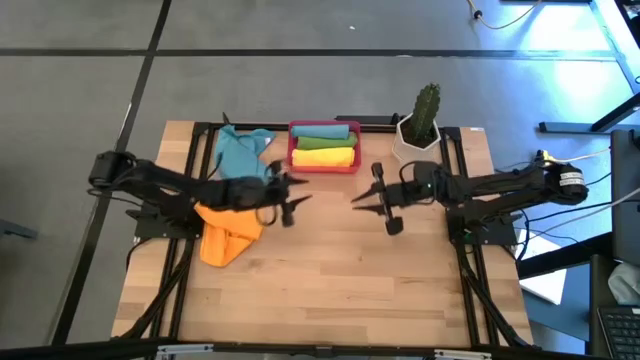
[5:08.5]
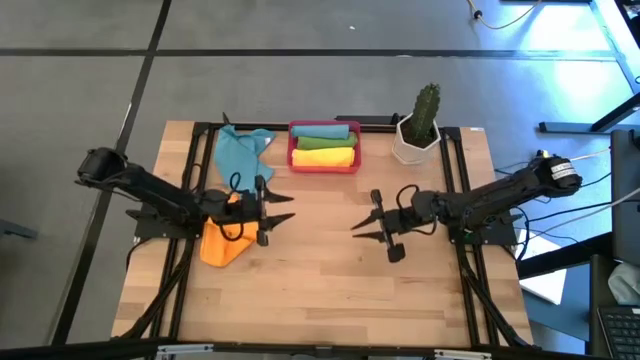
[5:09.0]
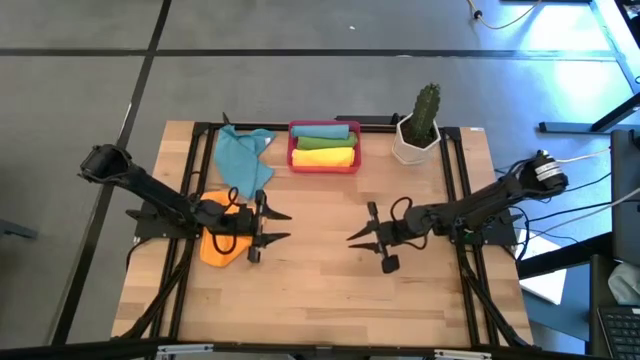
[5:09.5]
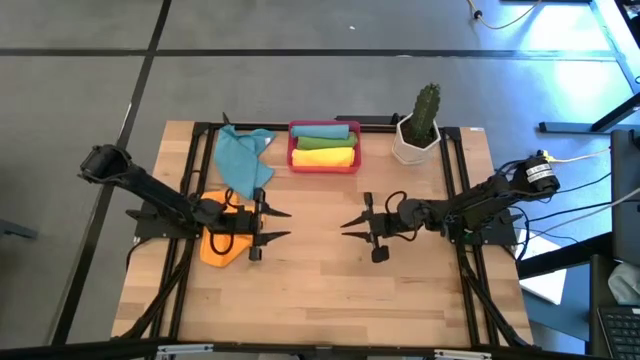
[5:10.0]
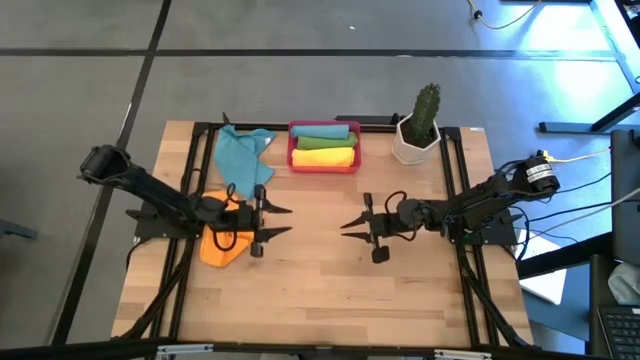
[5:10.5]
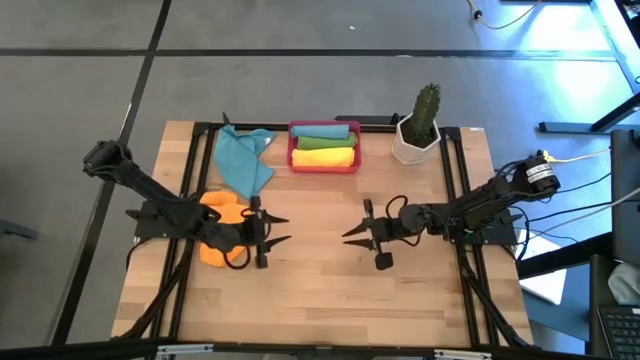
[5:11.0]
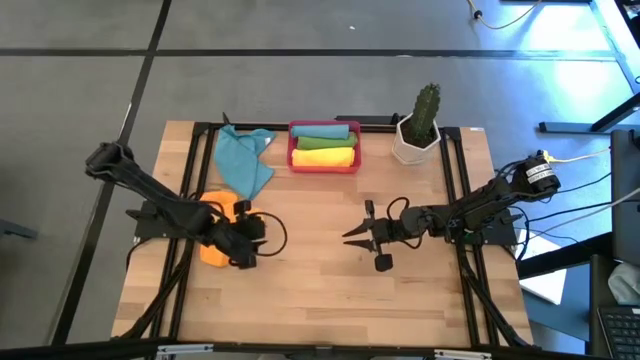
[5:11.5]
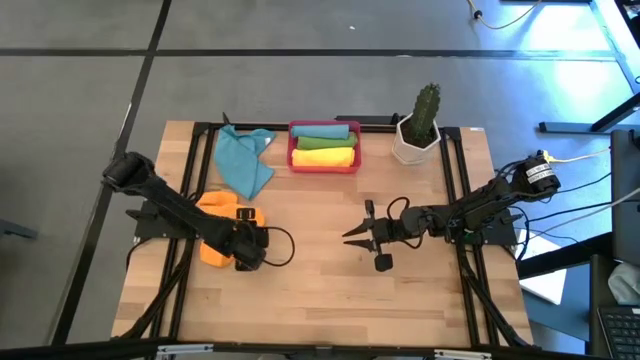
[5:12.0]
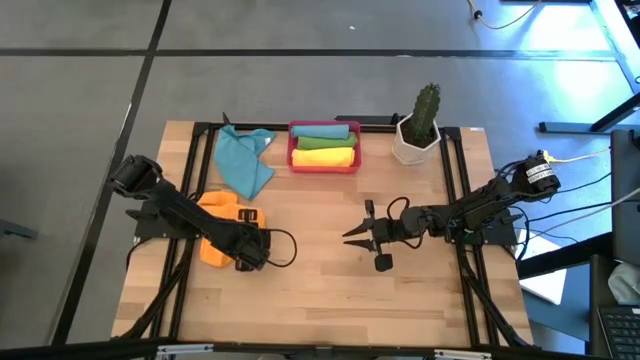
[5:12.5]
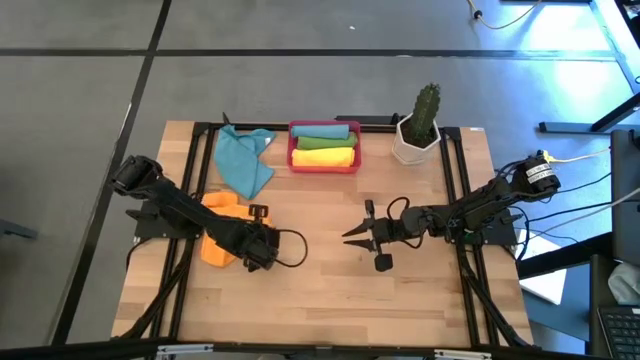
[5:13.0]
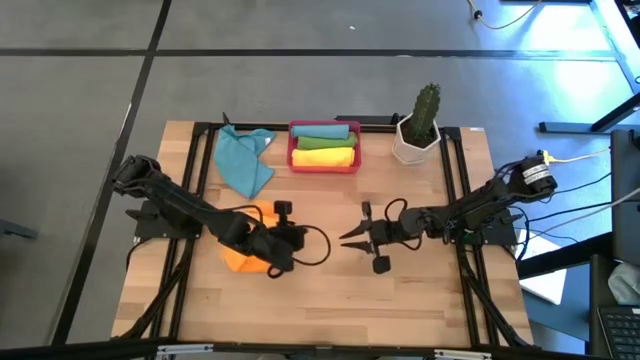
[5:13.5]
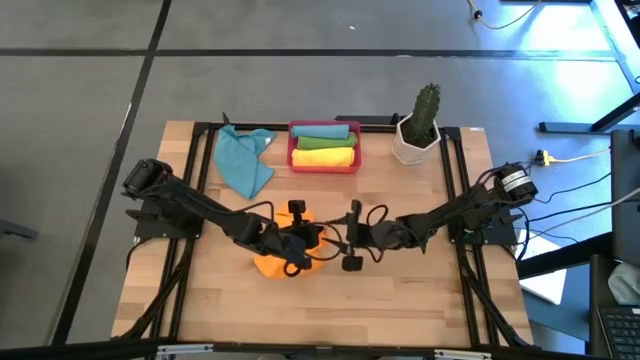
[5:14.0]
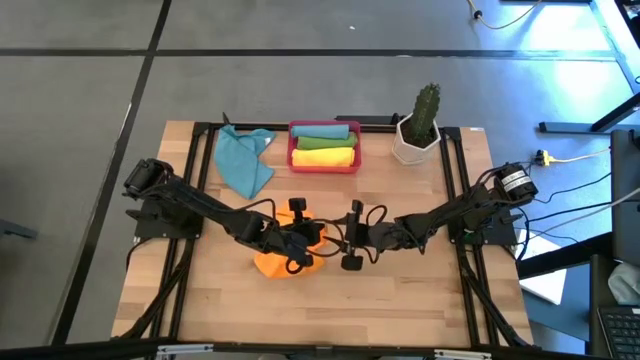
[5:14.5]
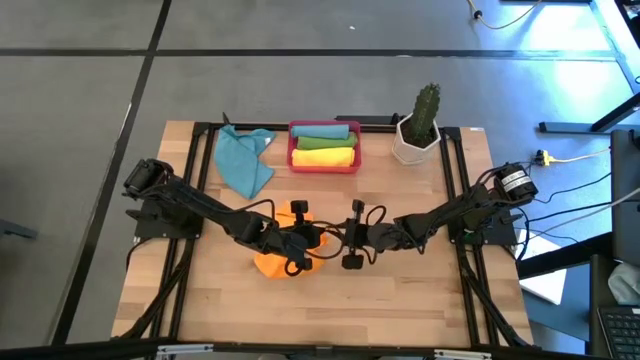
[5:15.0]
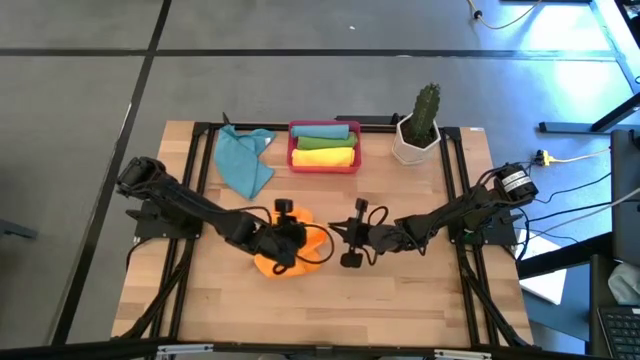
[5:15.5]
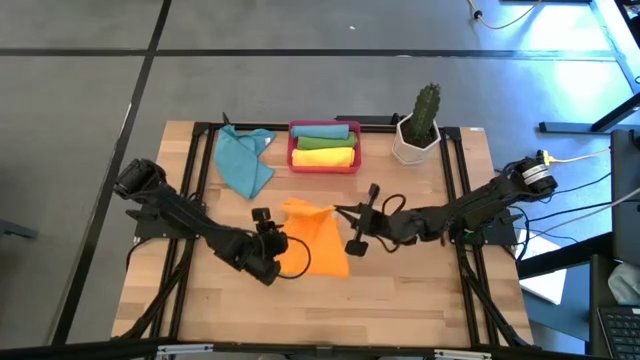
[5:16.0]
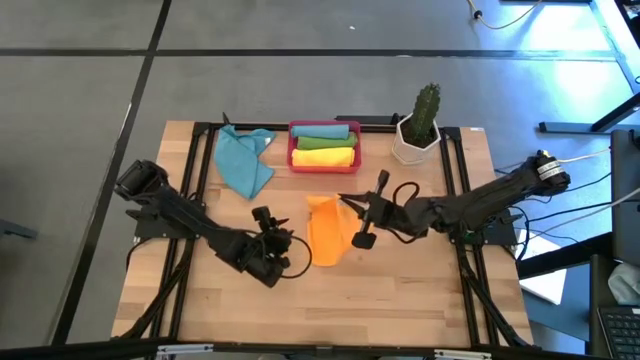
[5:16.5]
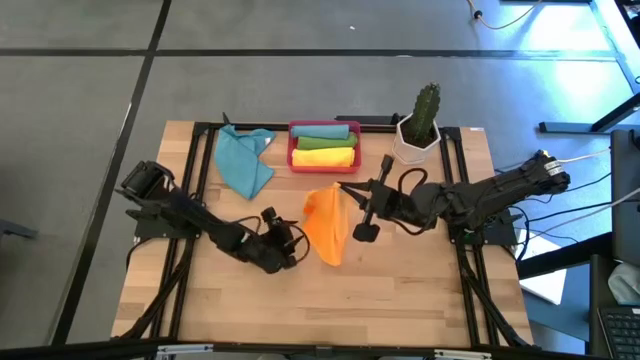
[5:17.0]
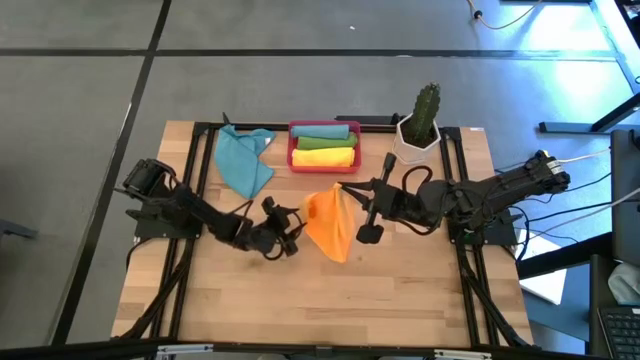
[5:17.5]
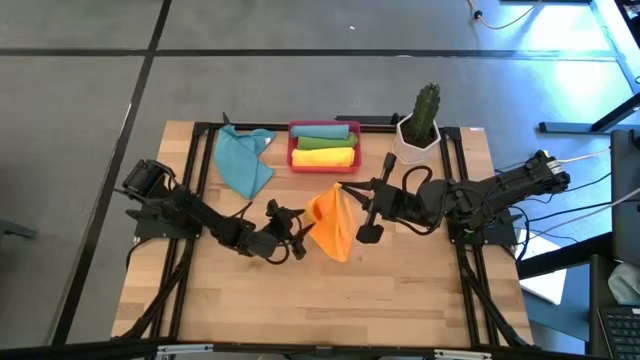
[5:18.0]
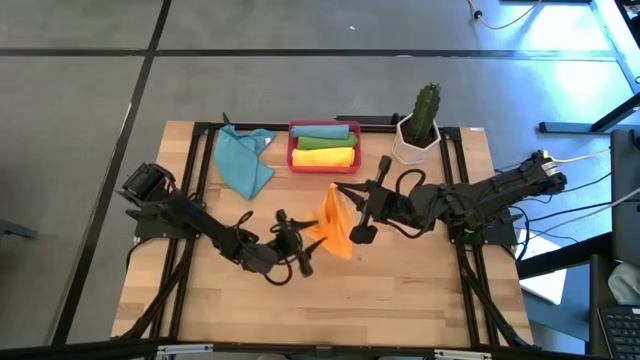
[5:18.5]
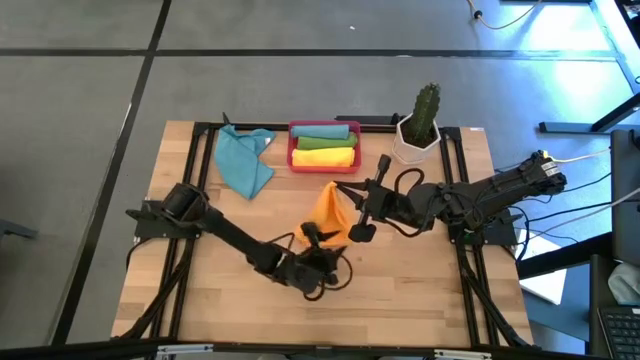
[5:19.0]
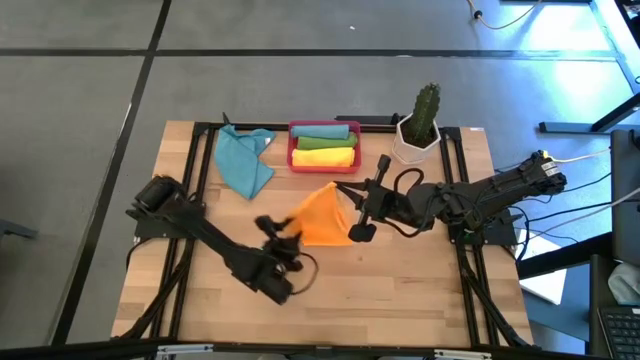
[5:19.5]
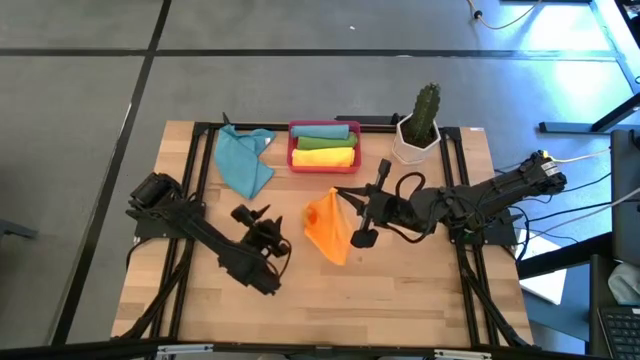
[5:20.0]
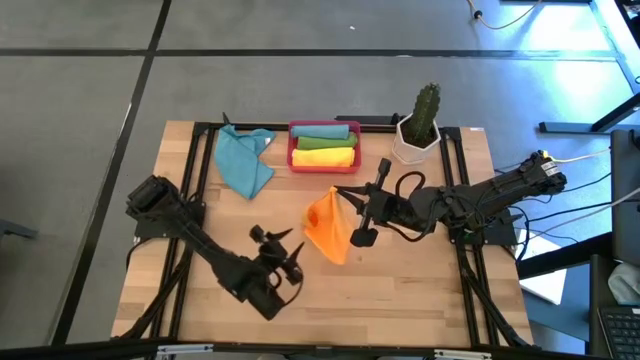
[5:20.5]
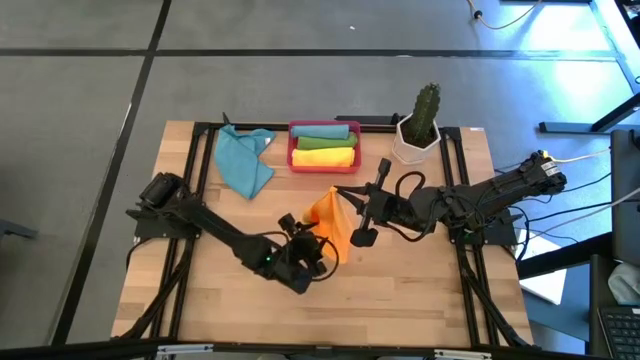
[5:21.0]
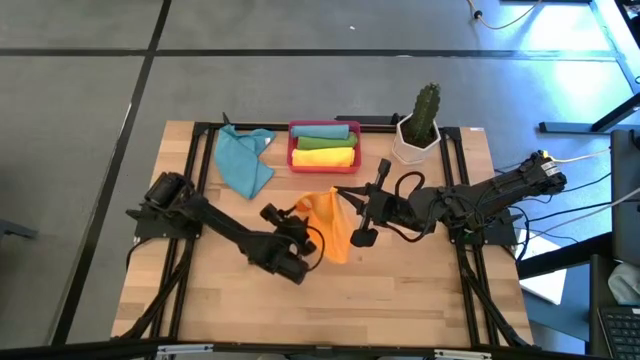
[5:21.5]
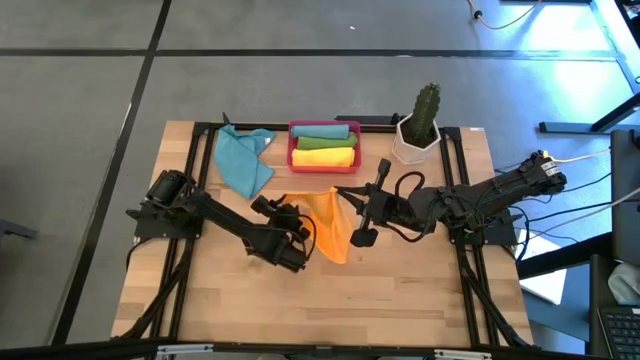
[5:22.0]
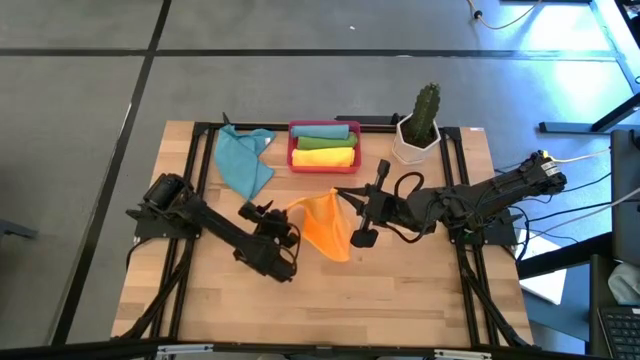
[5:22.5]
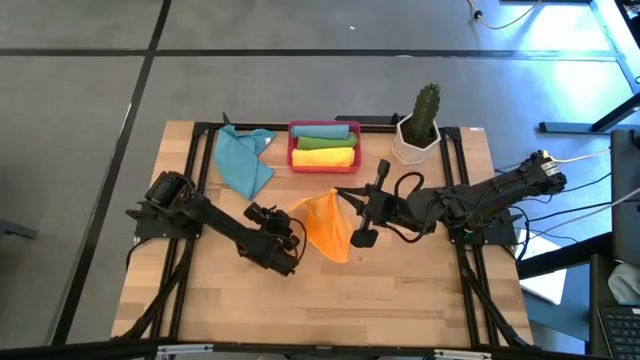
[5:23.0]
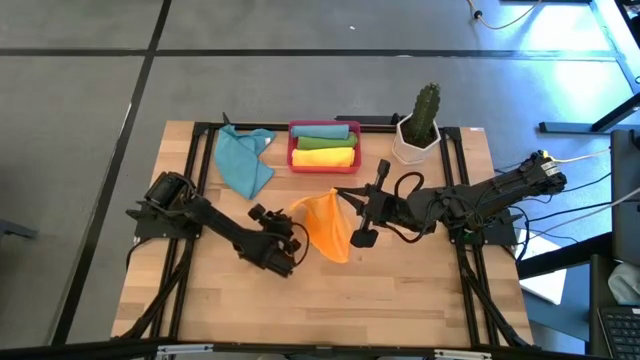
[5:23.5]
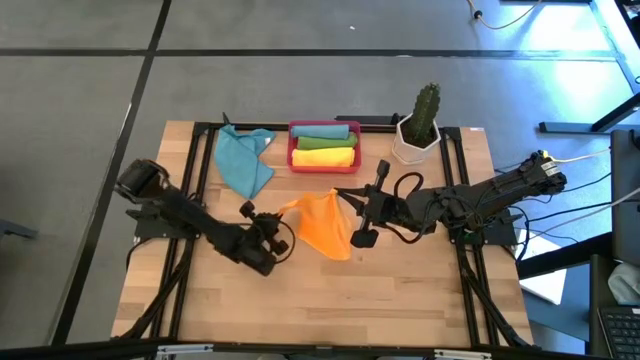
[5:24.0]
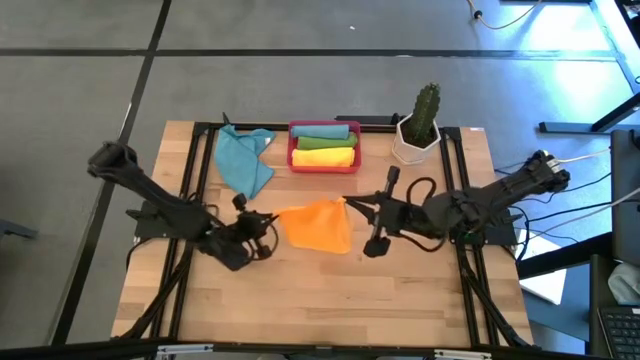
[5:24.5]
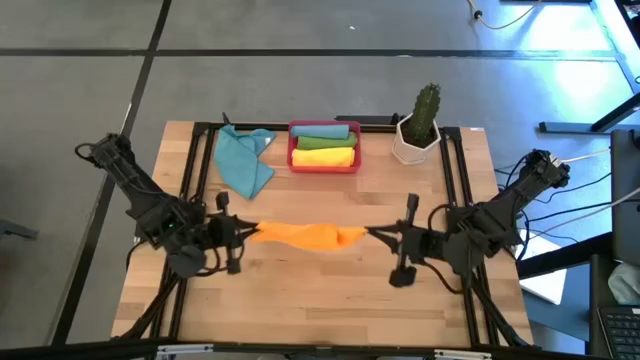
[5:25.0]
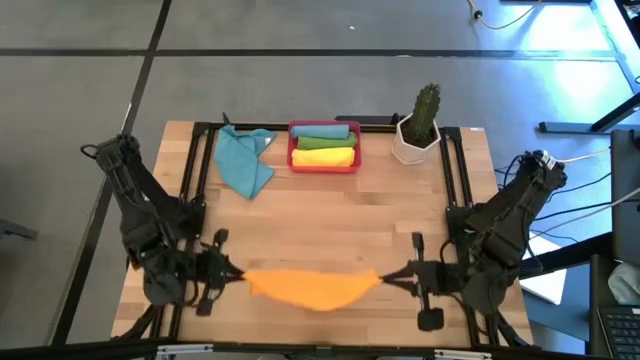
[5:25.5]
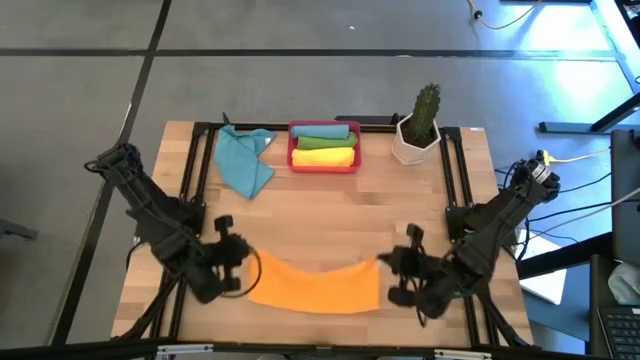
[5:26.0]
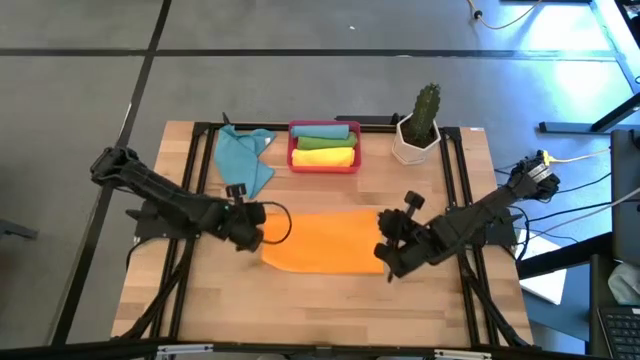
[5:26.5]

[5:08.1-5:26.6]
Task: Roll microfiber towels into tight, uniform cylinder then place into a basket
Roll the orange towel

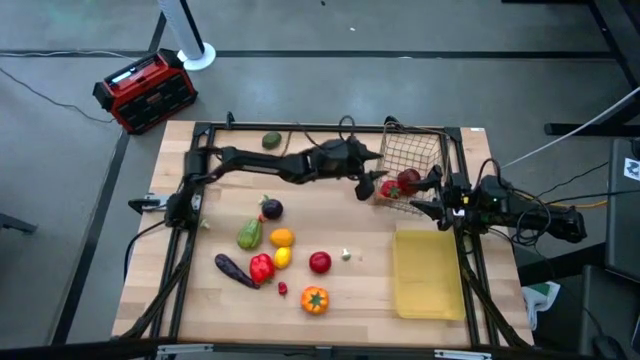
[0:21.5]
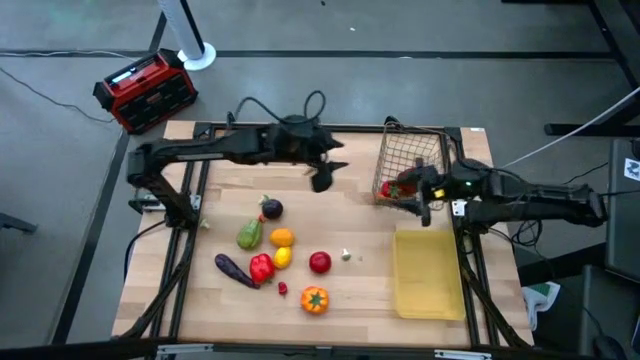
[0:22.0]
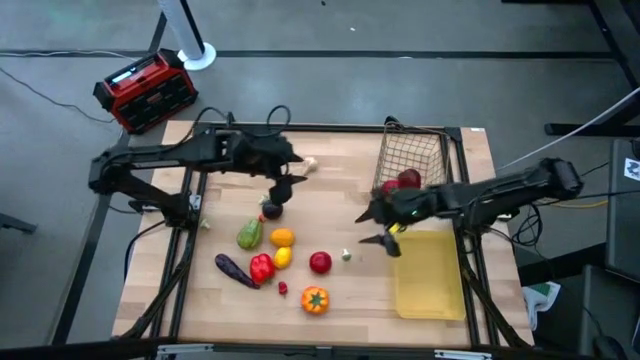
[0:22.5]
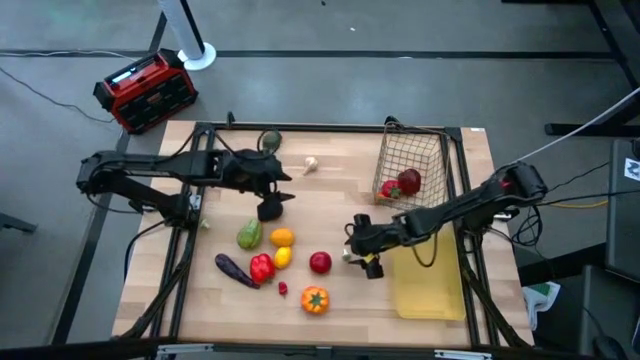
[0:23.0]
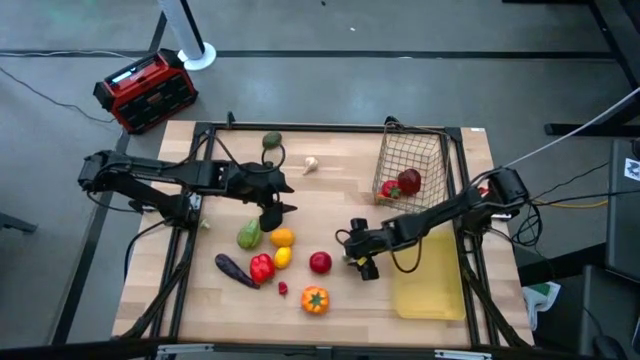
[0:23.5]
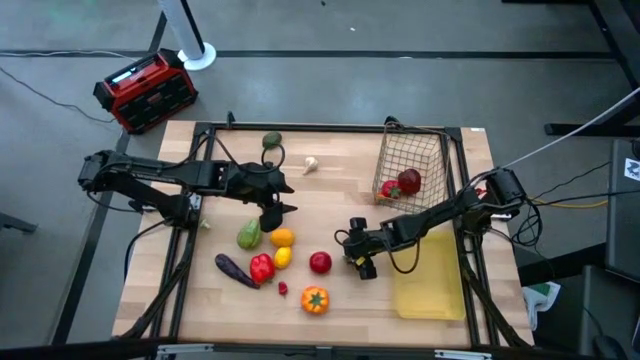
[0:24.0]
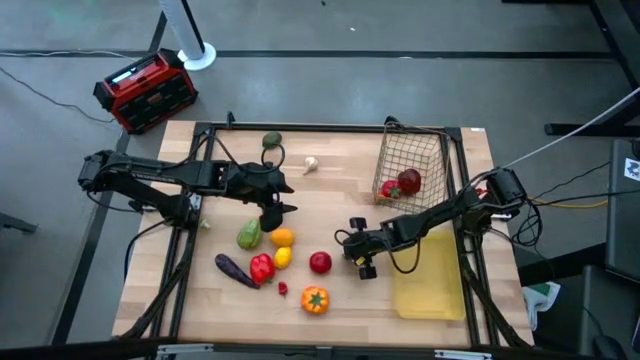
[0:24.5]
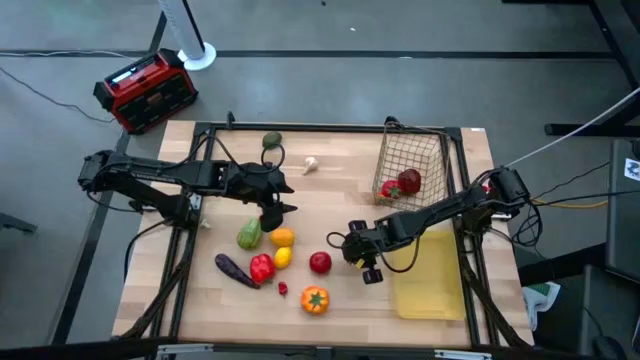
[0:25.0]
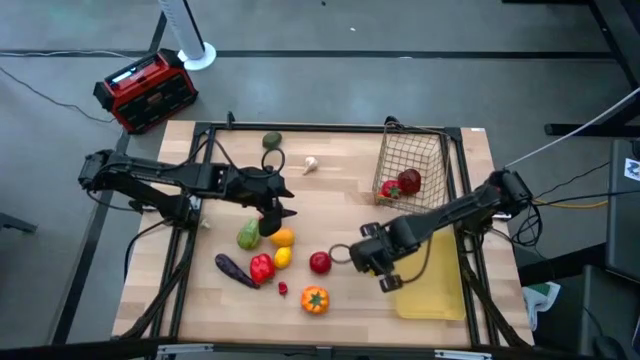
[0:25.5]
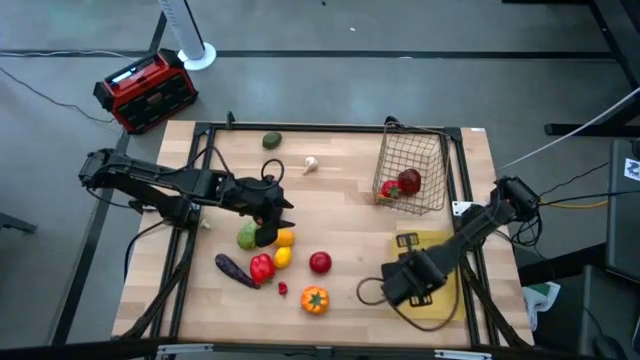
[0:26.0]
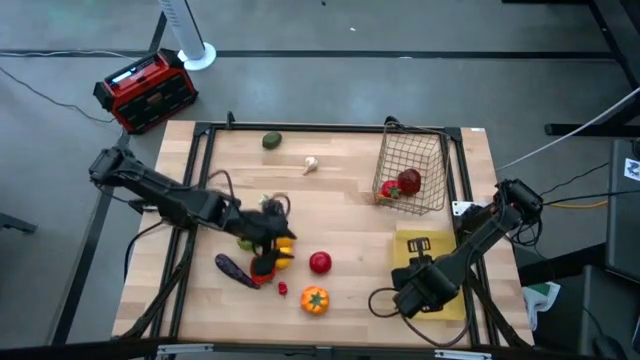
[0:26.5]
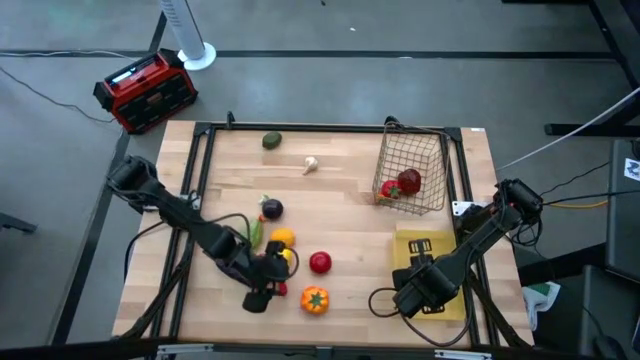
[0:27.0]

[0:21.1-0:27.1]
Task: Sort produce into baskets
Put the right green mushroom into the yellow basket
